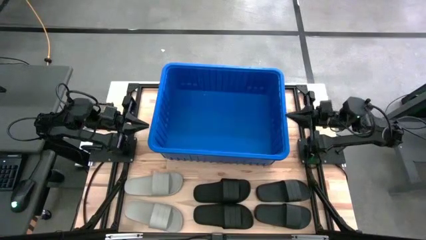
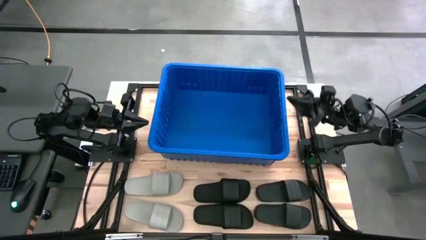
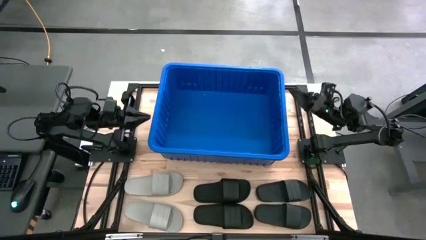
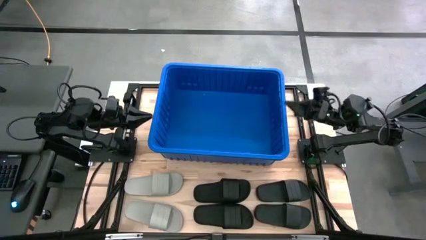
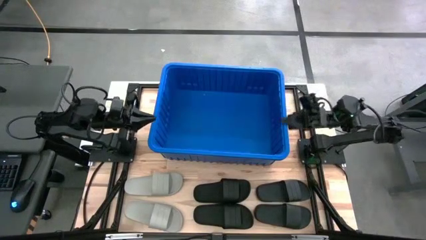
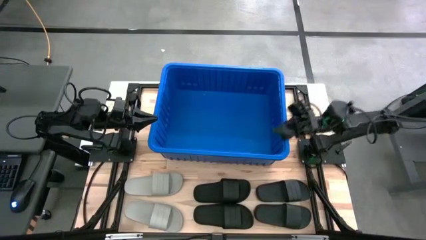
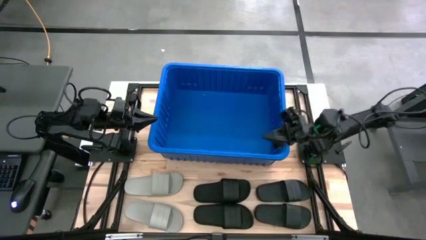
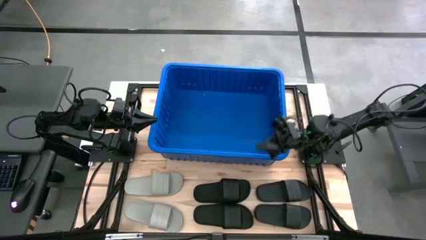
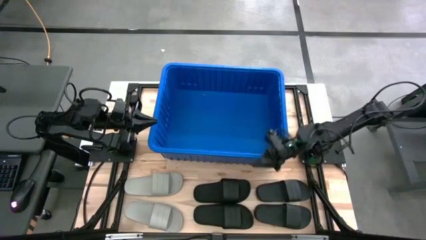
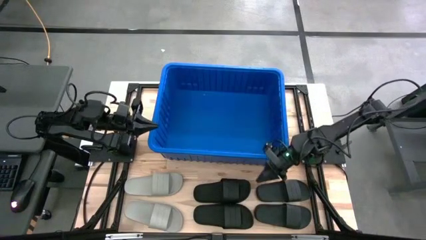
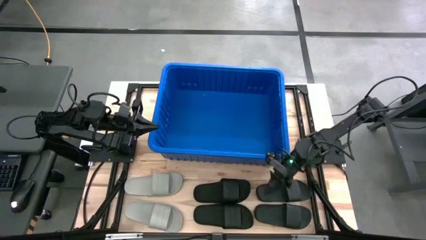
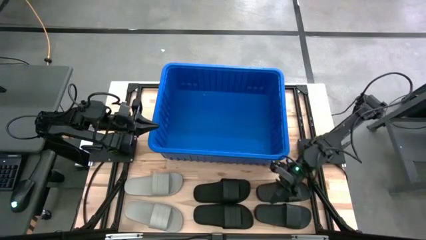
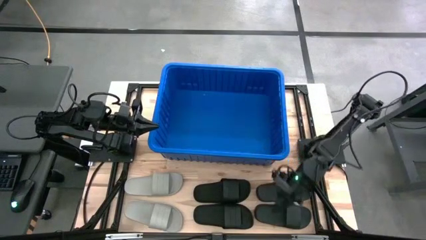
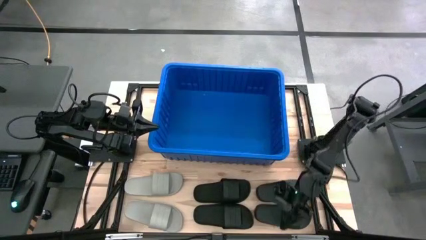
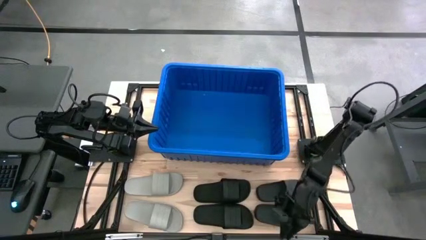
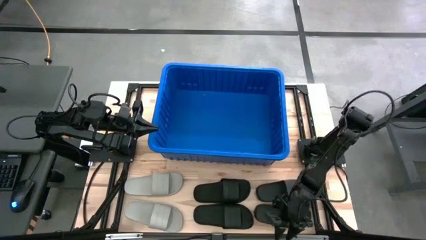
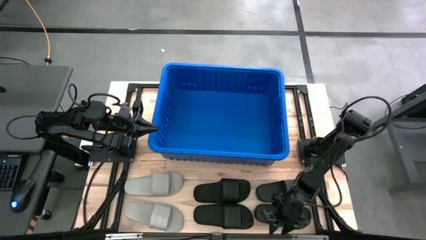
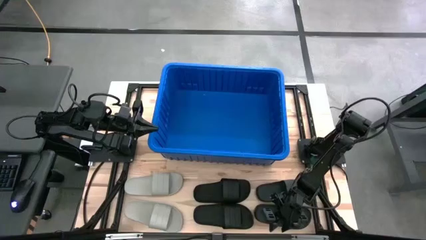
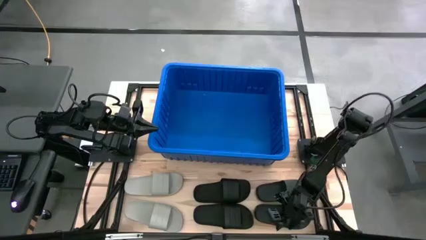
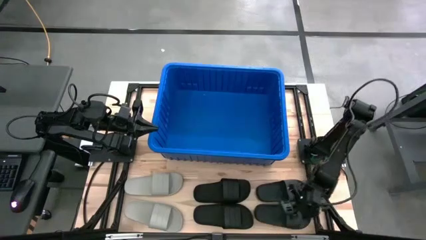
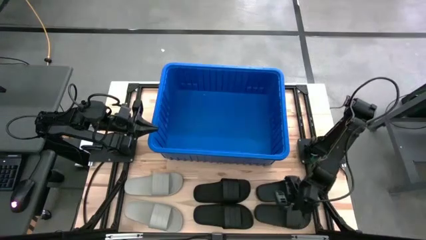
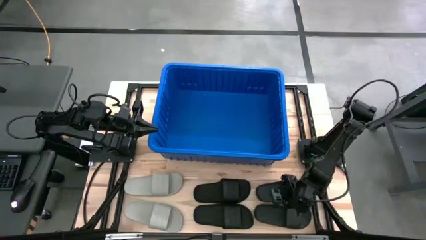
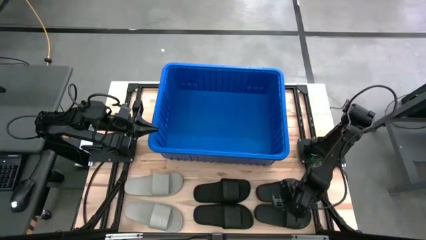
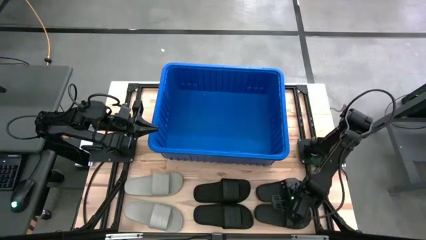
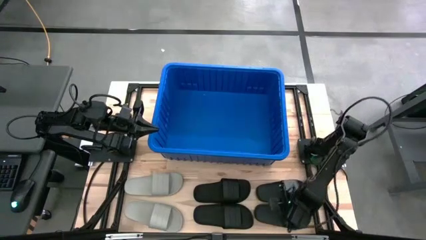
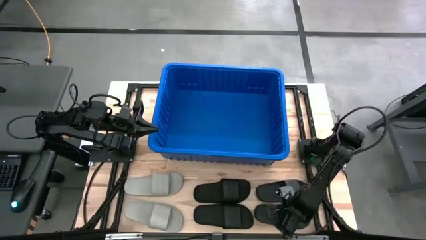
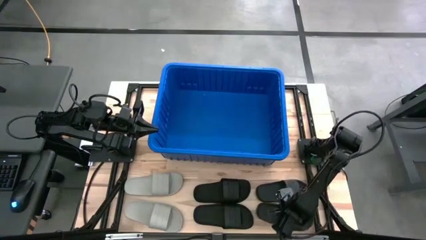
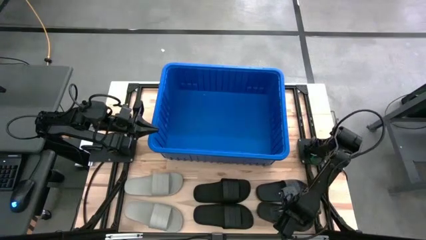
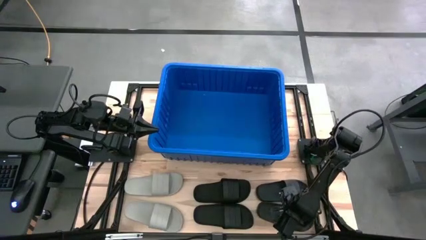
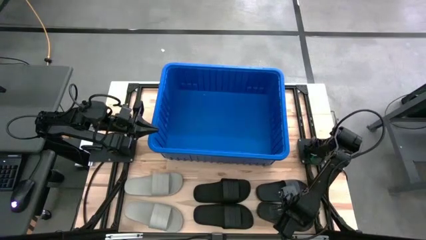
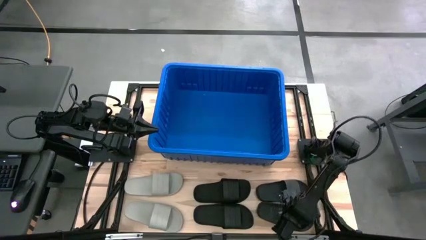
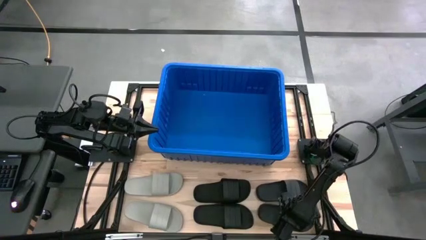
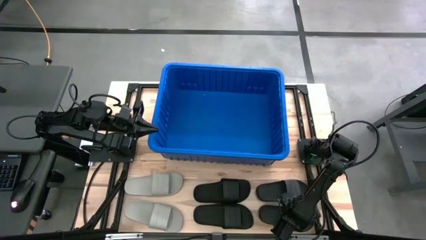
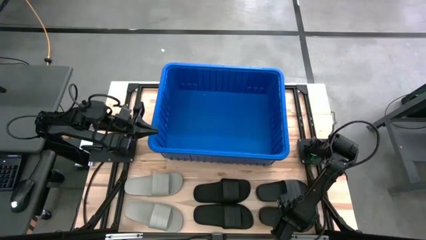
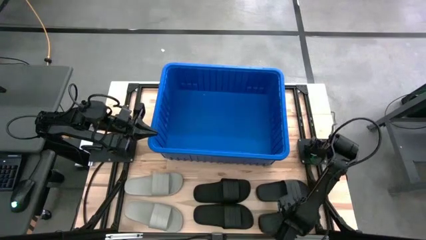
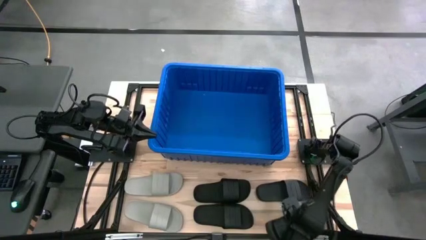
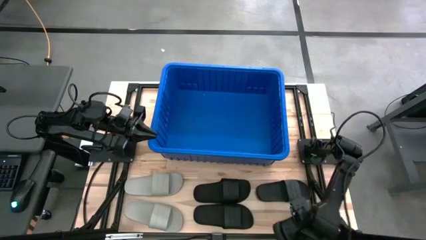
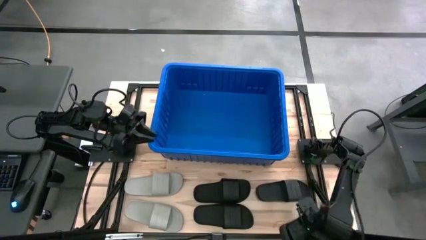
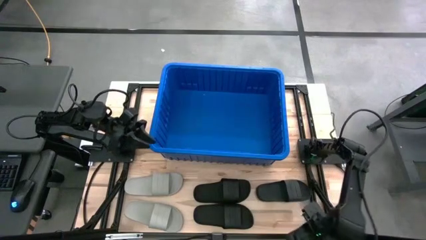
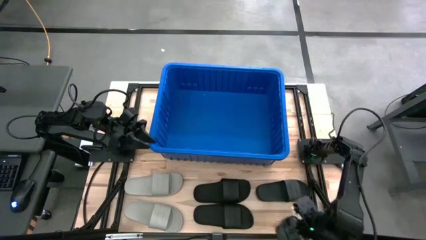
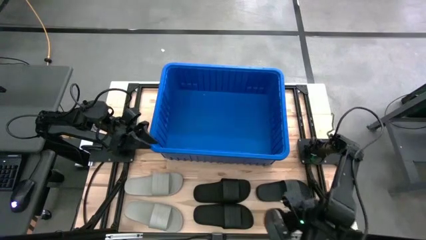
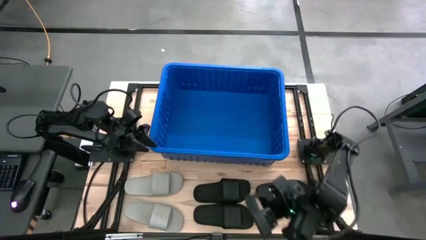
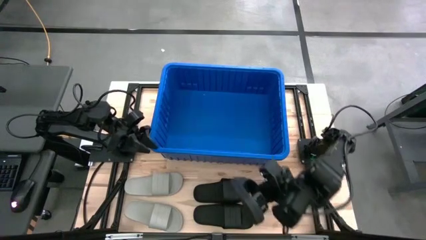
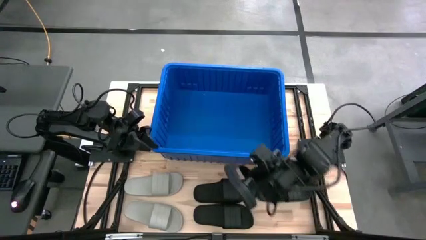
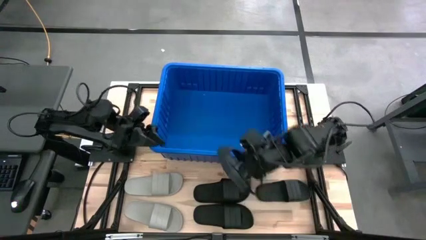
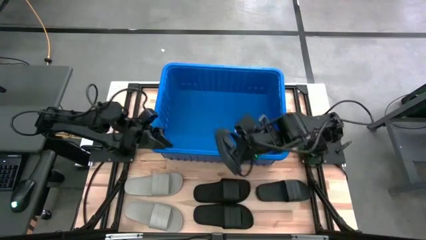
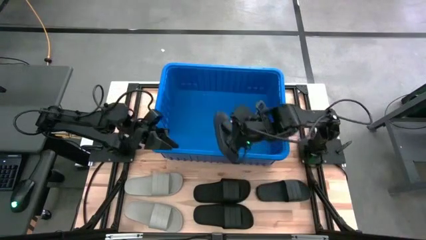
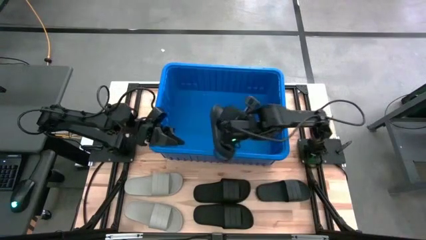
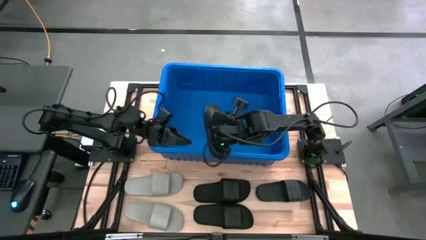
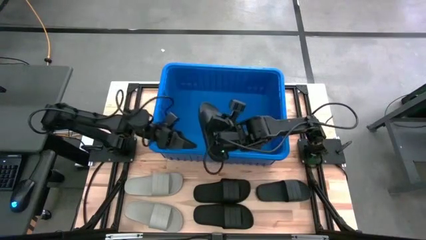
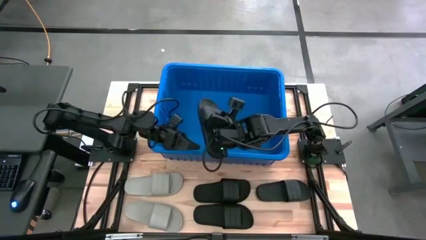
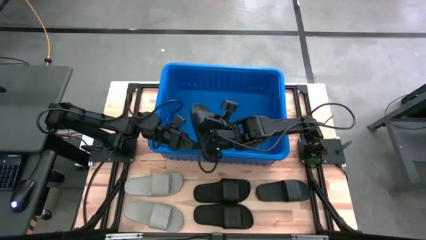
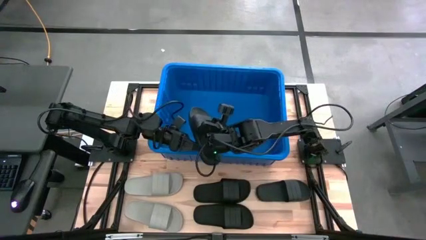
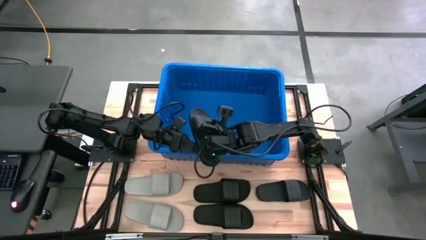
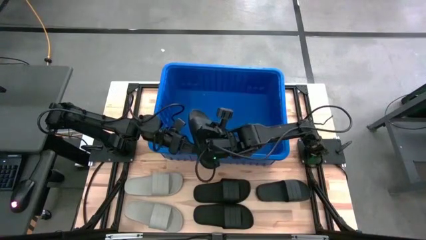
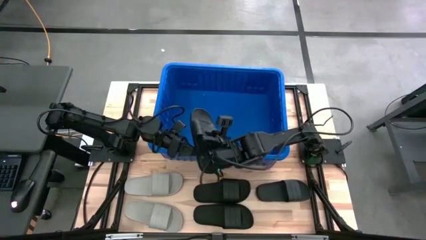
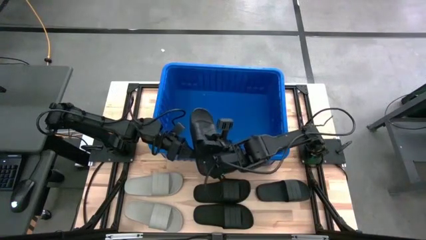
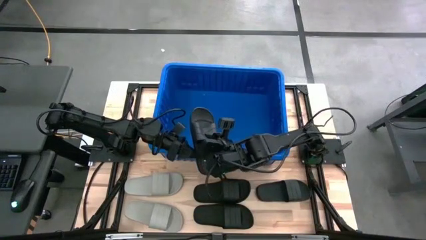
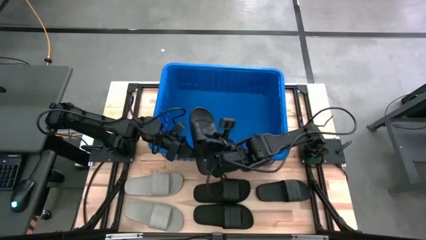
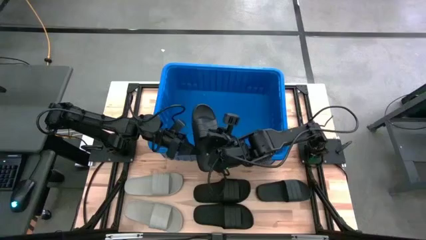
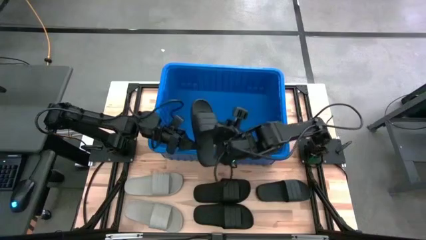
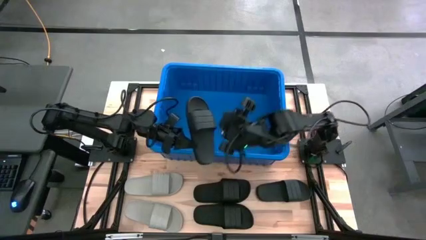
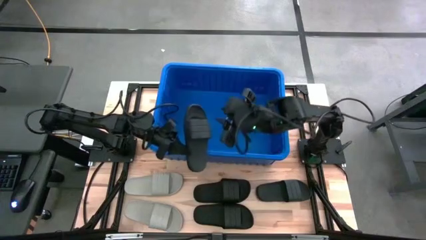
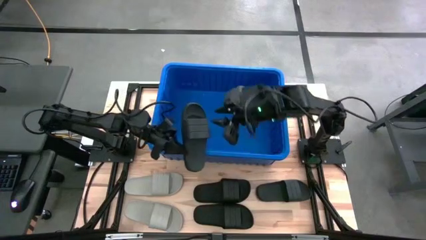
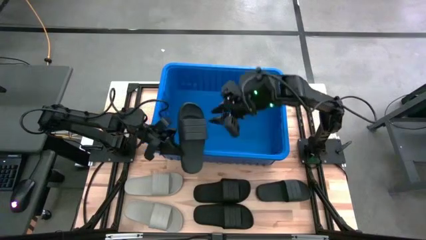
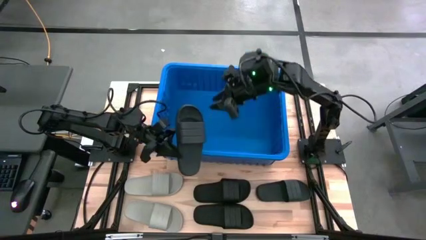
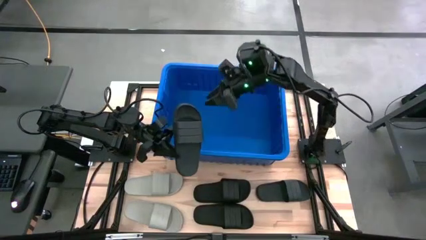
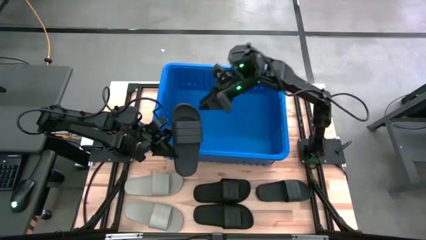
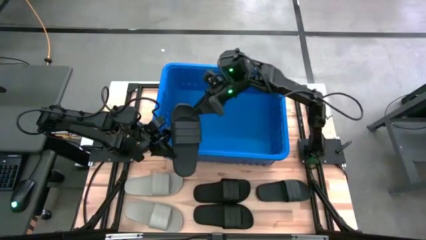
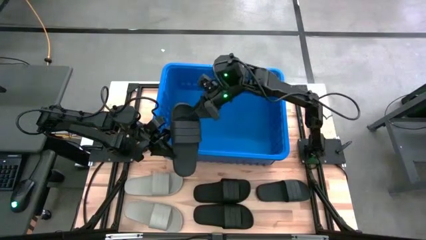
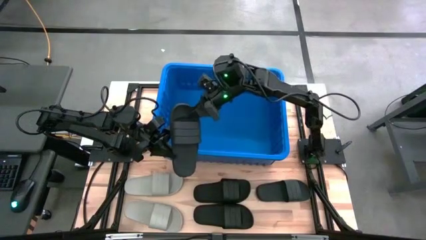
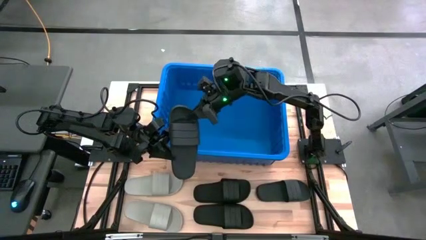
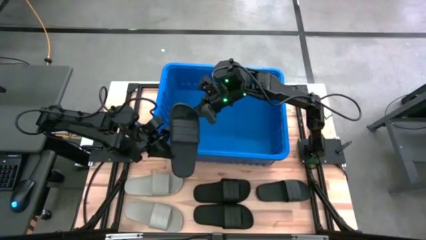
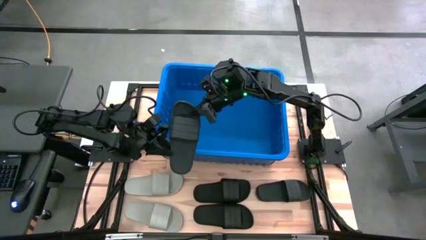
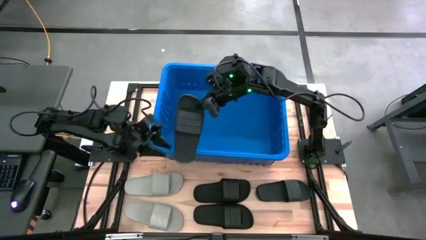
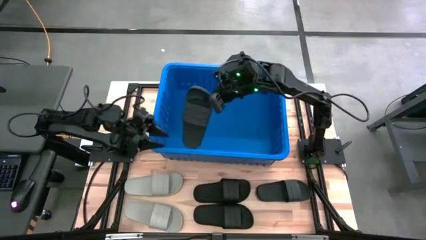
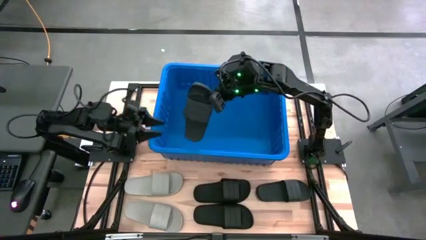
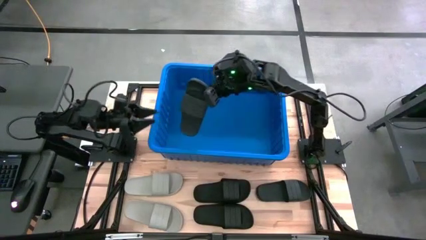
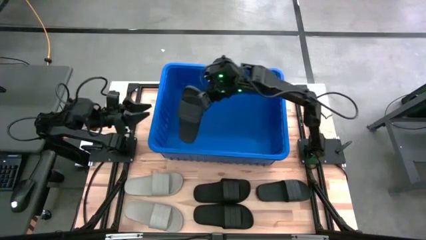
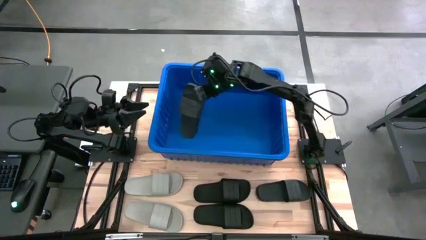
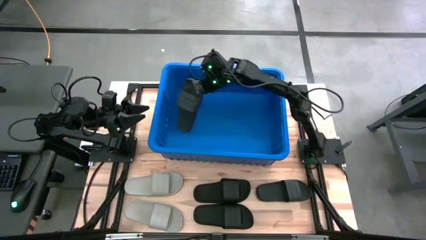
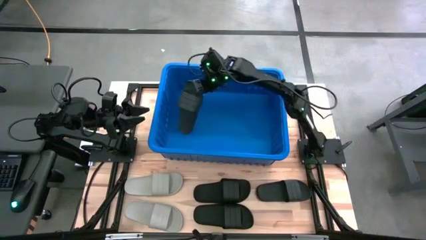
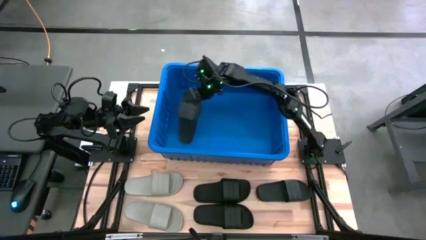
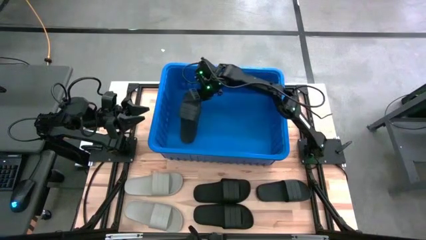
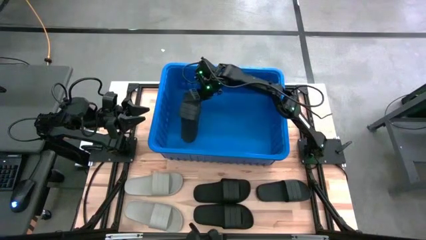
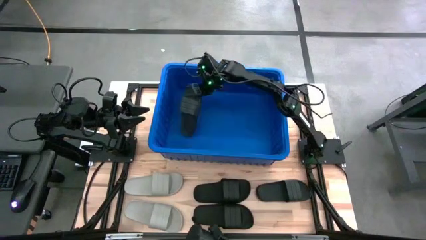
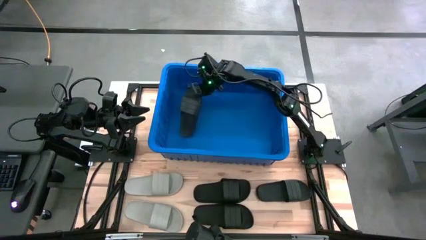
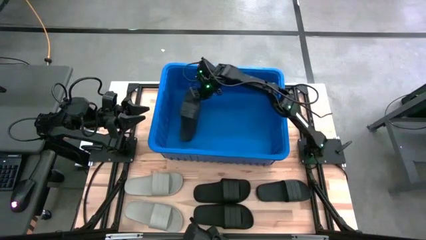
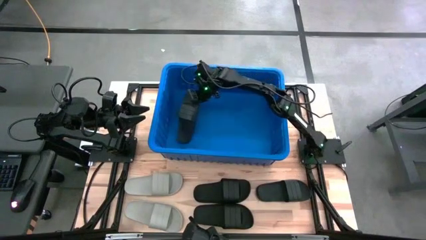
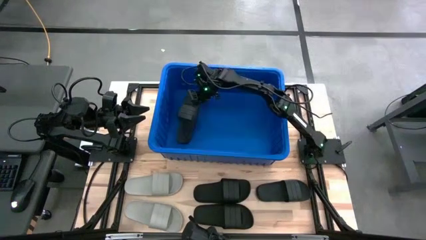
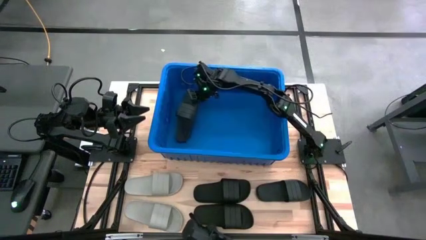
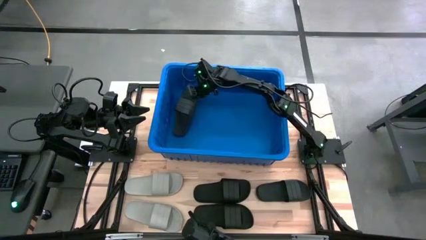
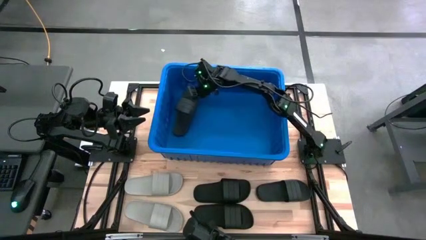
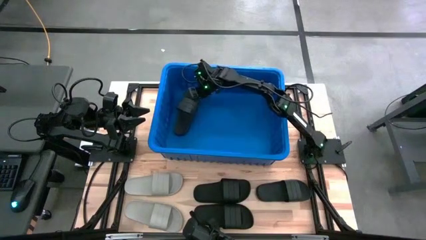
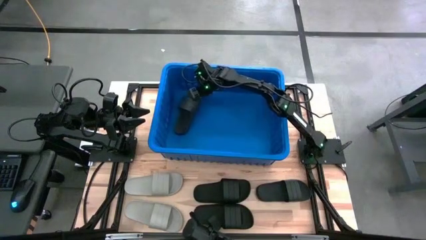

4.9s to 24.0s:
Task: Pick and place slides into bin
Put the bottom right black slide into the blue bin
